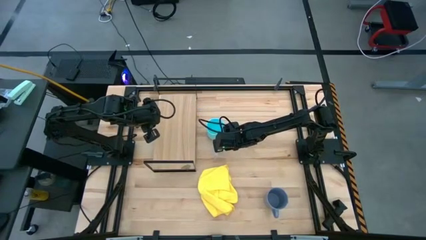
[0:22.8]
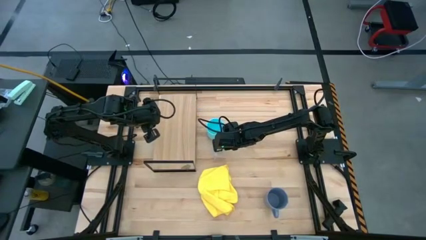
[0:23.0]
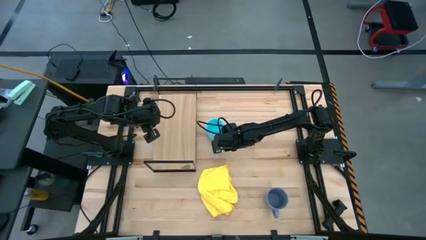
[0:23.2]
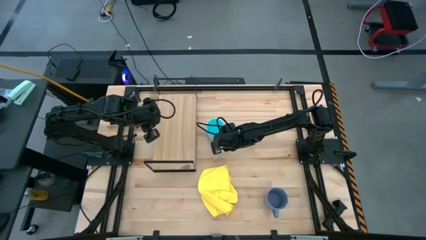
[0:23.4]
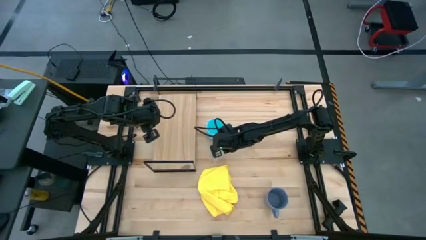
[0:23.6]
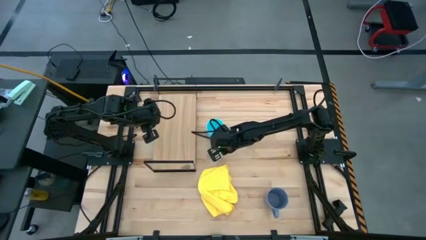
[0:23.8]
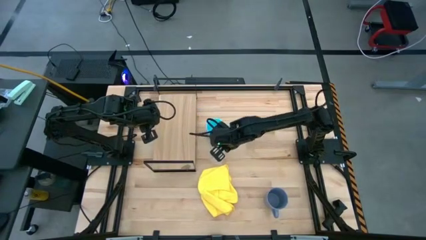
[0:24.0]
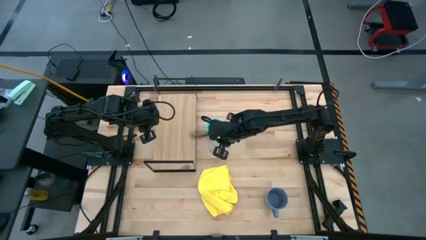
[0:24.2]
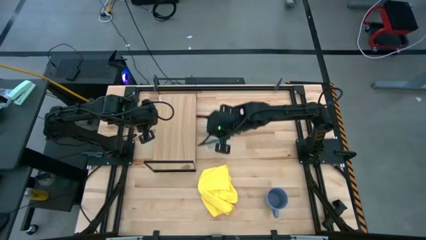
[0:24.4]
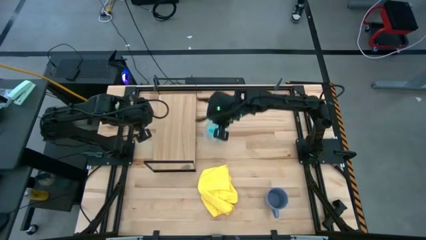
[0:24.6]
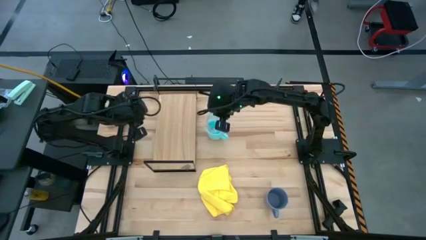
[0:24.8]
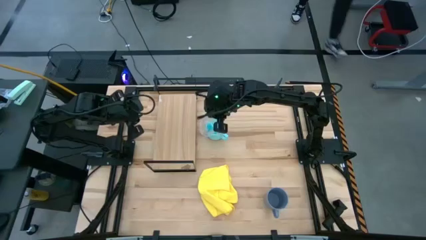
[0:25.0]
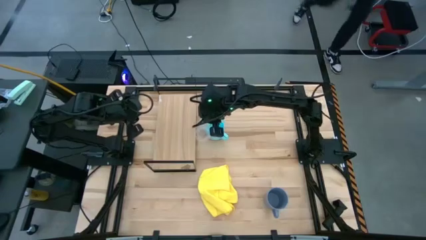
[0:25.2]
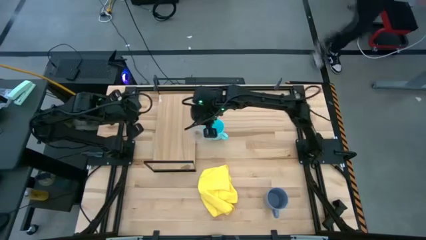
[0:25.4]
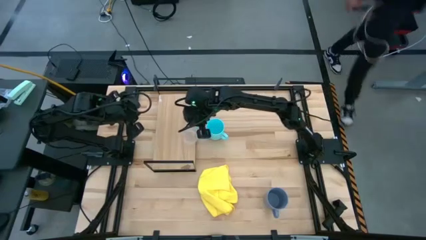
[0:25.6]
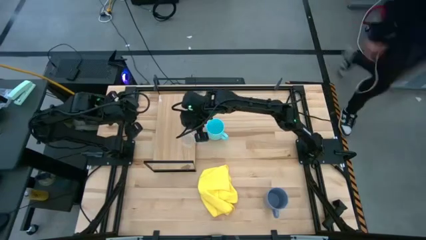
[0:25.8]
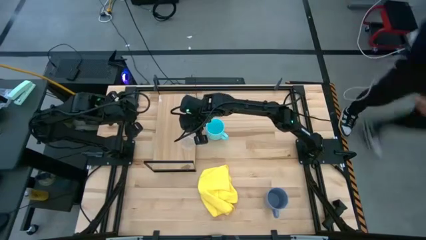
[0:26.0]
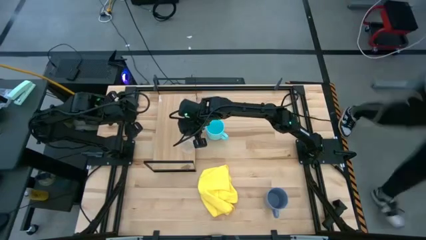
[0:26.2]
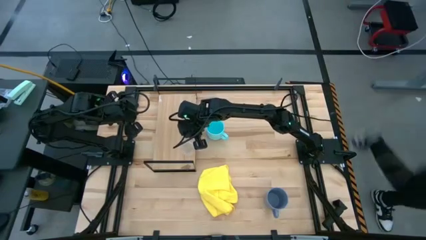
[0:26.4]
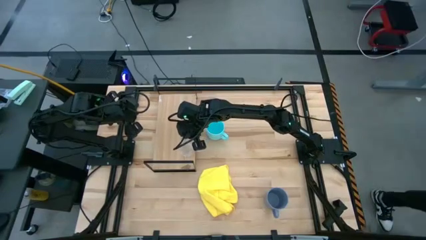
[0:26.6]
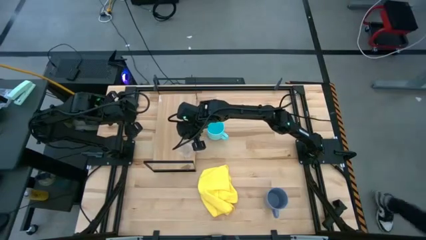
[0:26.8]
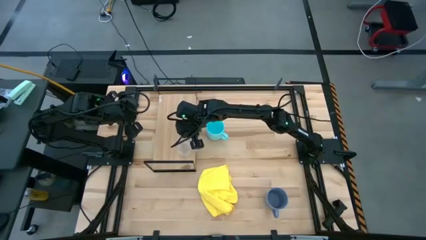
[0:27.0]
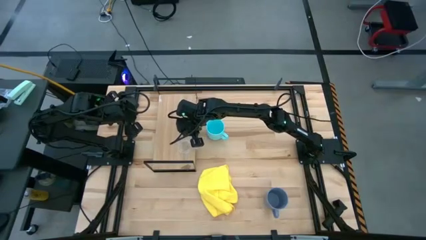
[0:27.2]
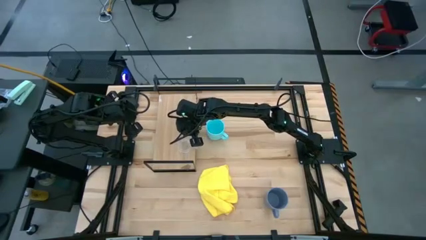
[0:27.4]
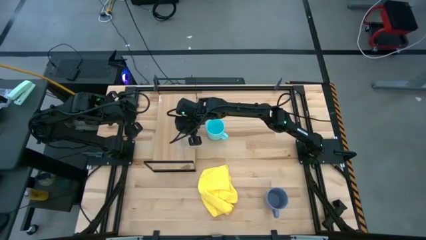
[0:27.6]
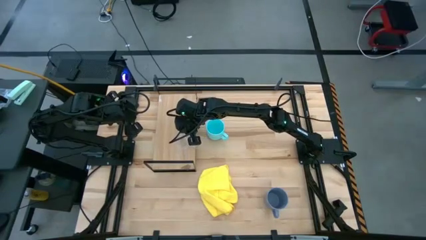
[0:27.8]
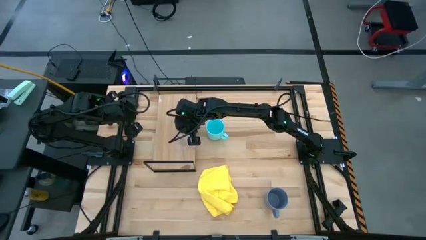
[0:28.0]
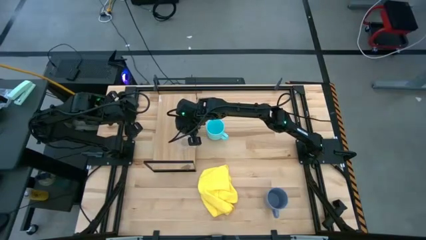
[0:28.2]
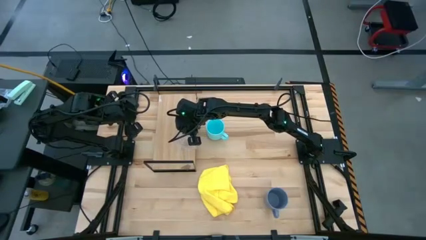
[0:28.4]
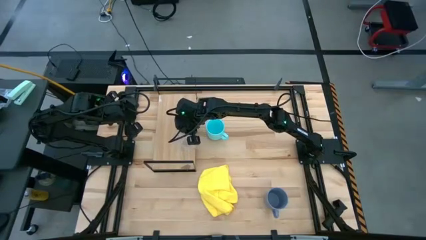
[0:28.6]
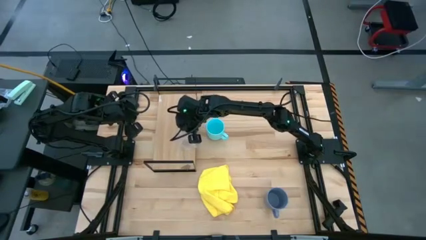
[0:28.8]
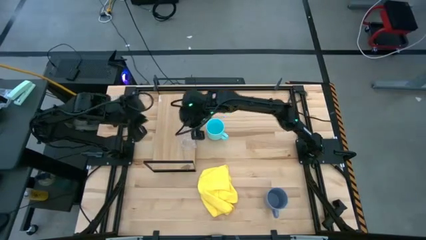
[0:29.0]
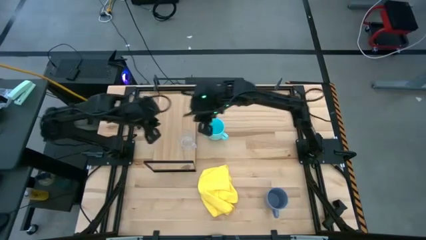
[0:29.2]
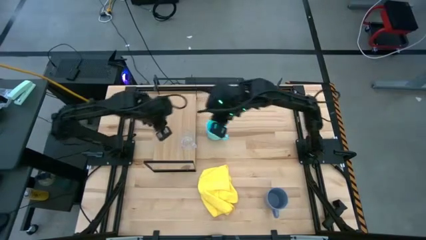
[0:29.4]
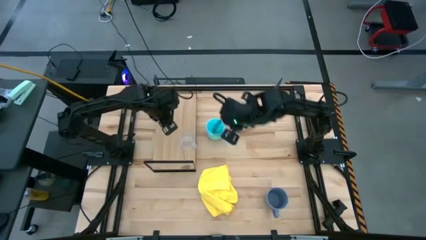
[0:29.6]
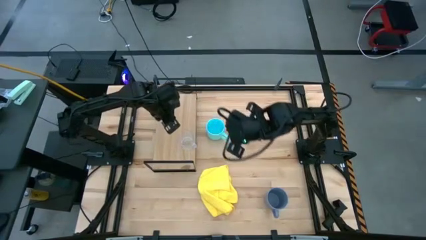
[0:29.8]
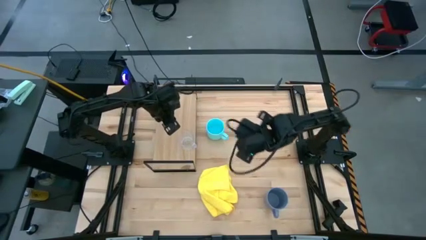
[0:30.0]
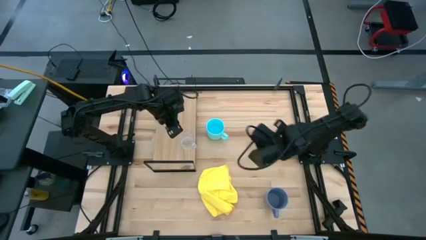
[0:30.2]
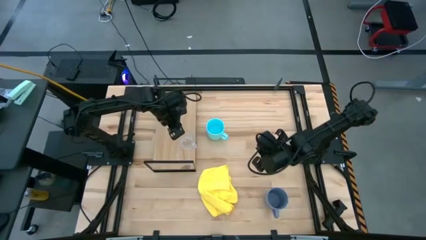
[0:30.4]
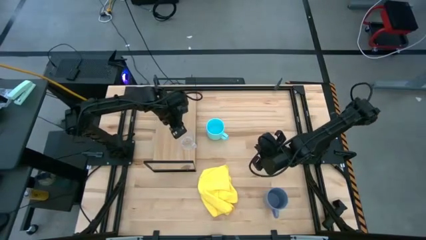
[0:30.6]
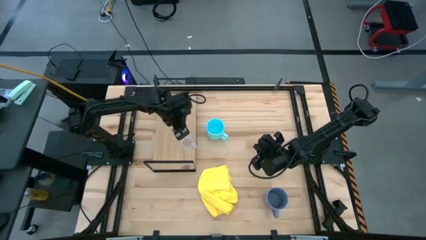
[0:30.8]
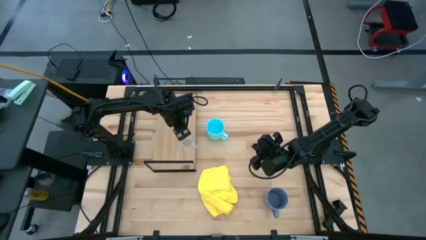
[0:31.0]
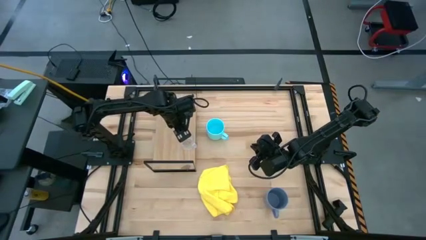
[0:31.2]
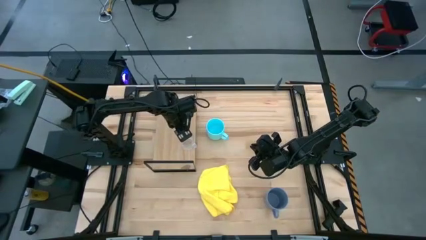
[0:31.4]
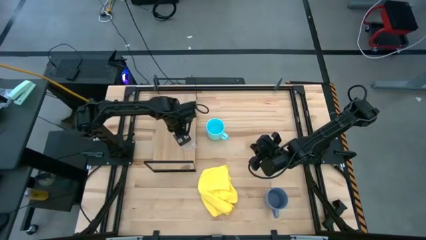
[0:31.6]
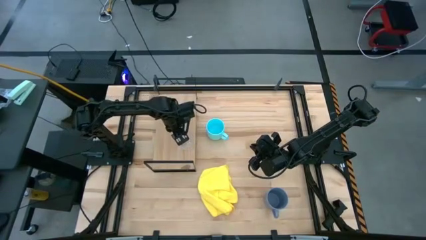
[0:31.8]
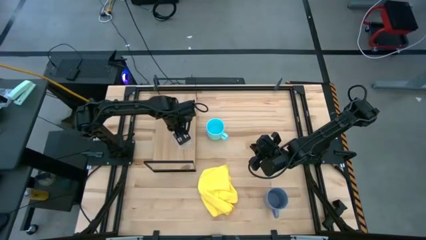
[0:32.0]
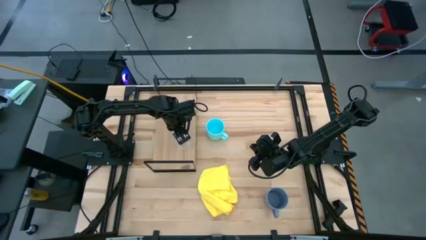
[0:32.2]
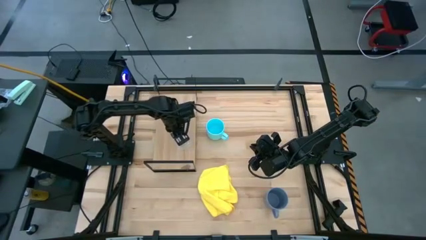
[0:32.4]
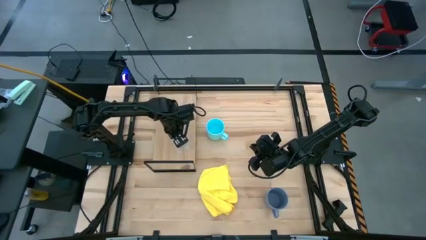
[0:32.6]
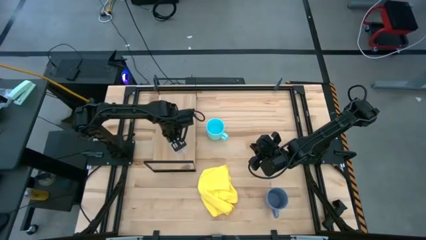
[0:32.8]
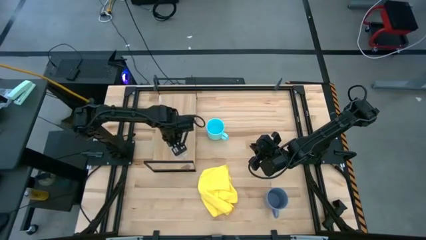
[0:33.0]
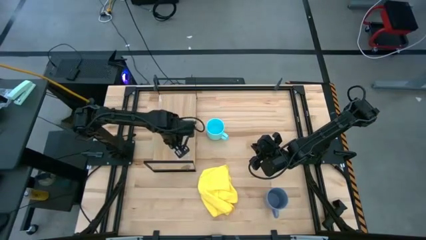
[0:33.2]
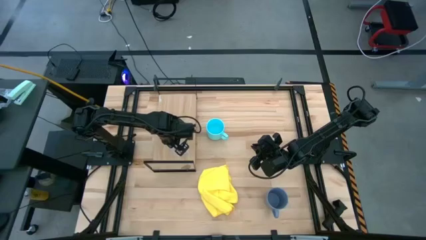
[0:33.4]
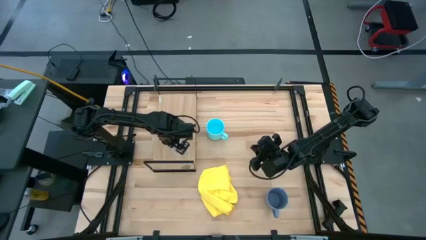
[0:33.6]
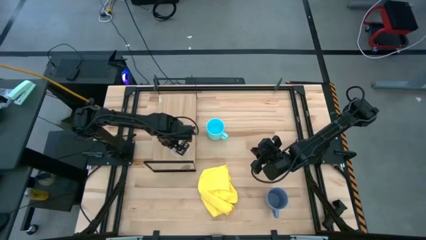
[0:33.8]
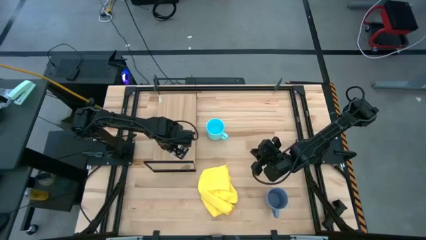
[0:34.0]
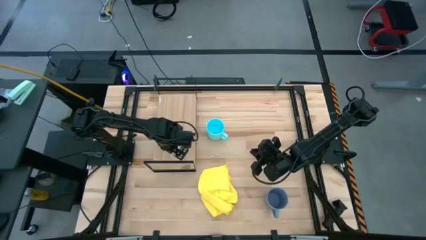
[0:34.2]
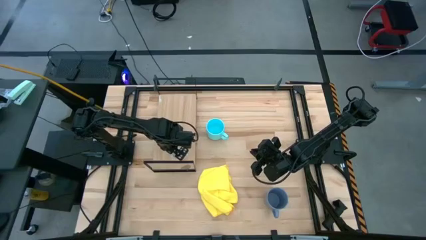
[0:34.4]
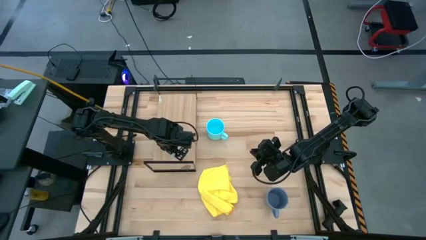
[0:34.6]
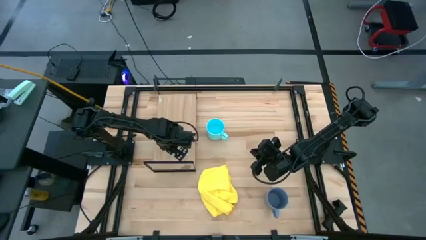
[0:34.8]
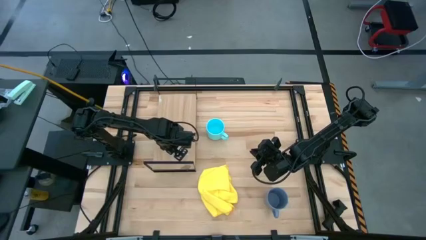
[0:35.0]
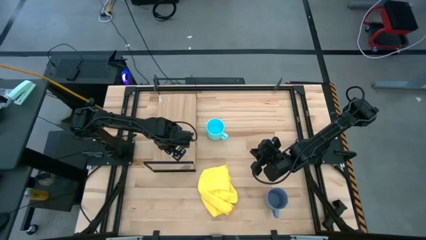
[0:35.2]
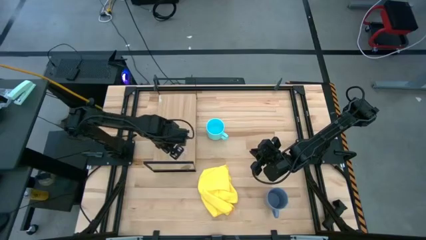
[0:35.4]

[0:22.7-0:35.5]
Task: Stack small to large cups/mugs on shelf
Put the transparent mug on the shelf
